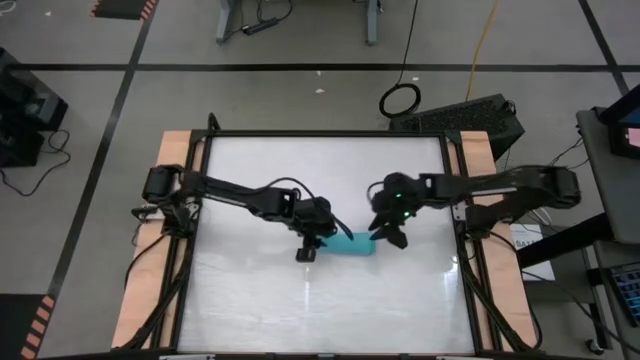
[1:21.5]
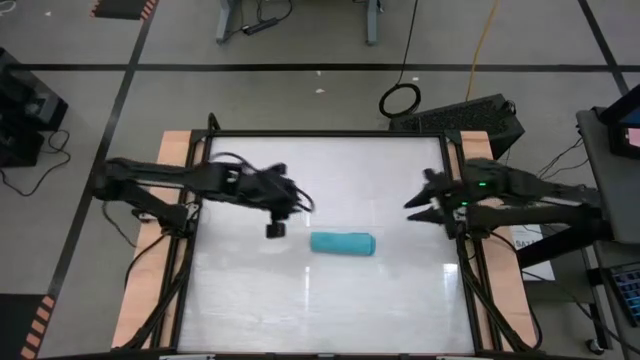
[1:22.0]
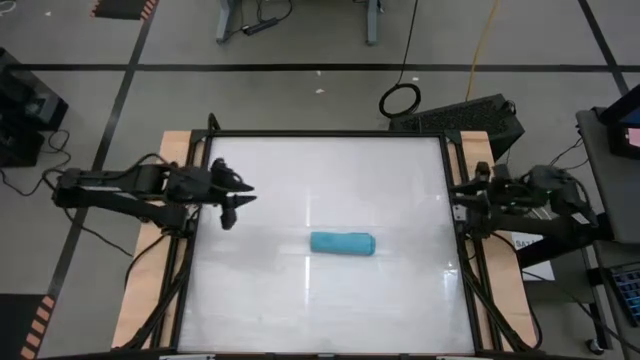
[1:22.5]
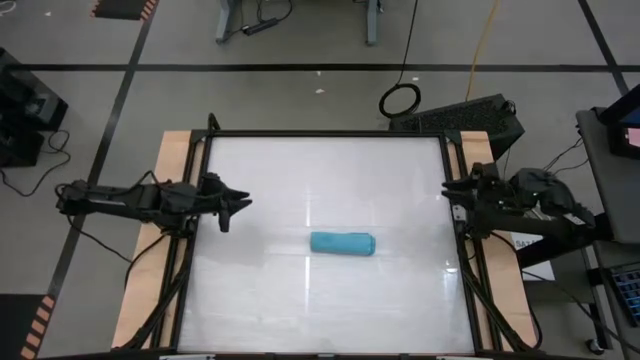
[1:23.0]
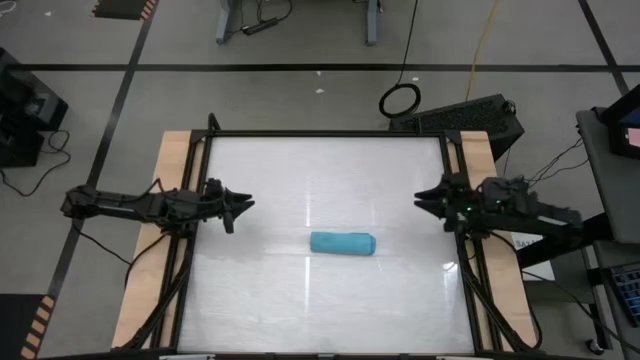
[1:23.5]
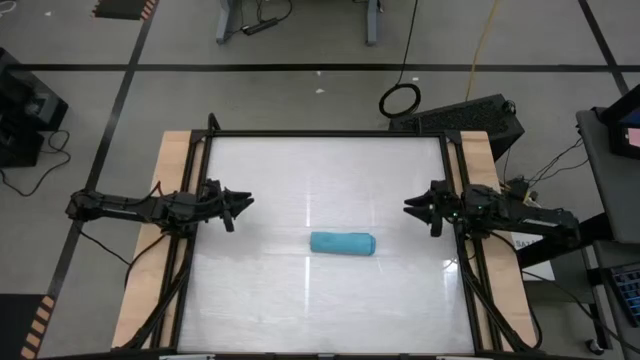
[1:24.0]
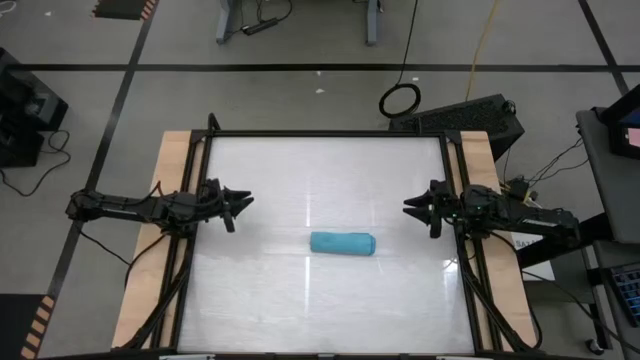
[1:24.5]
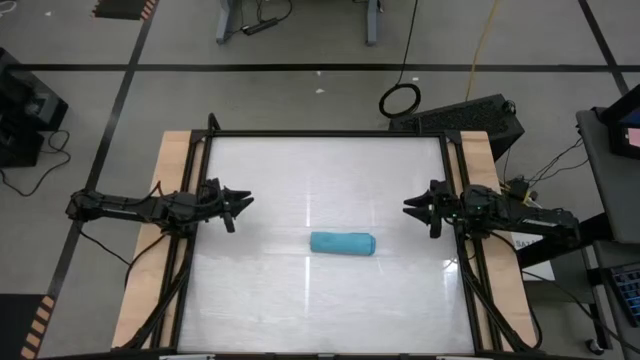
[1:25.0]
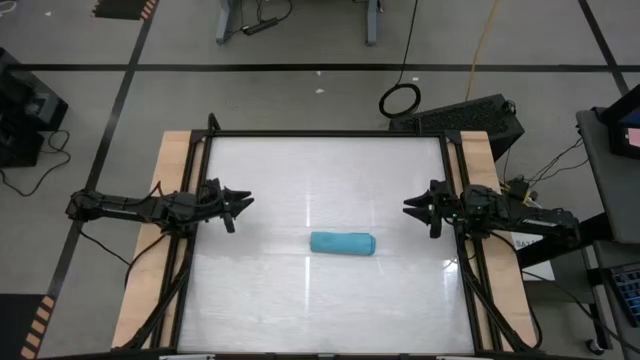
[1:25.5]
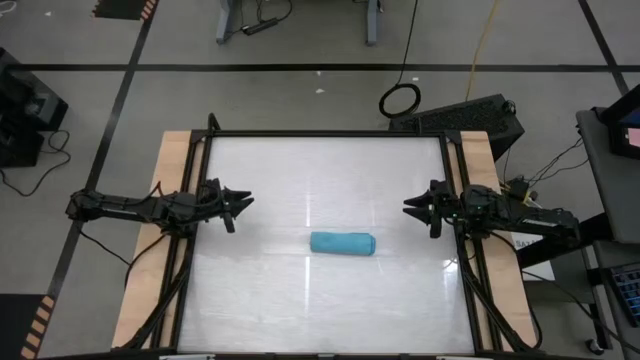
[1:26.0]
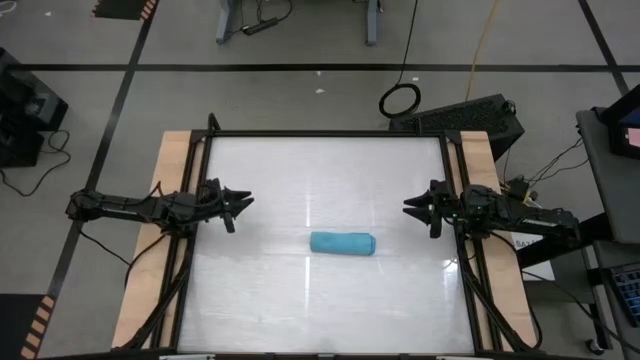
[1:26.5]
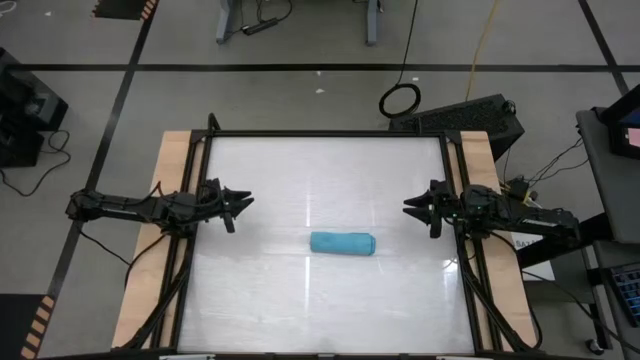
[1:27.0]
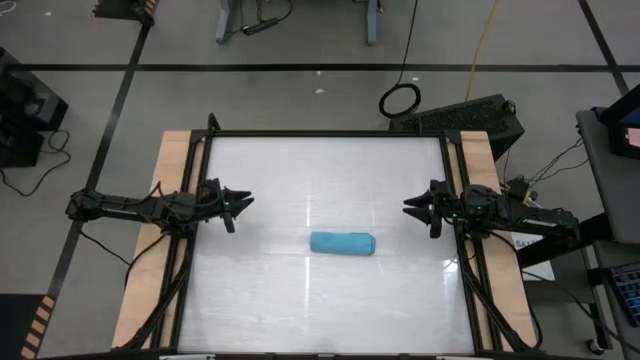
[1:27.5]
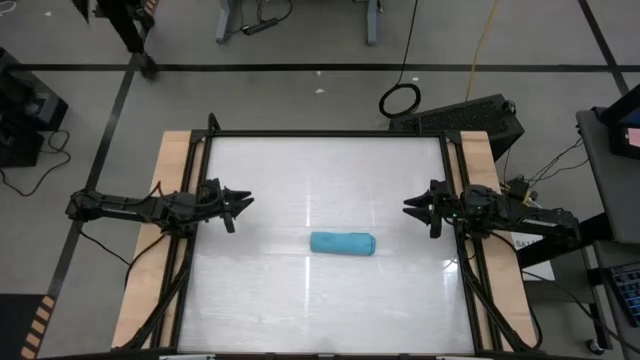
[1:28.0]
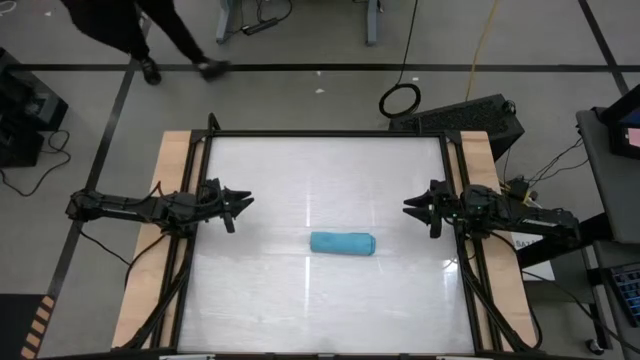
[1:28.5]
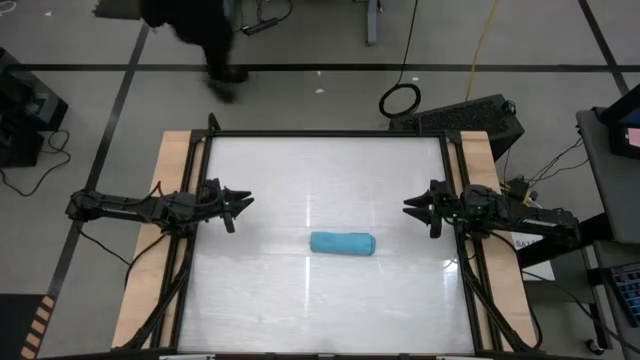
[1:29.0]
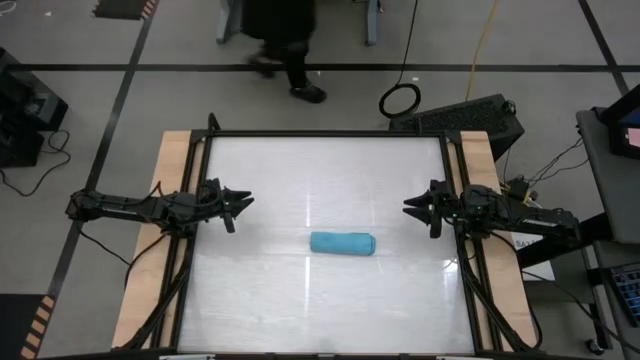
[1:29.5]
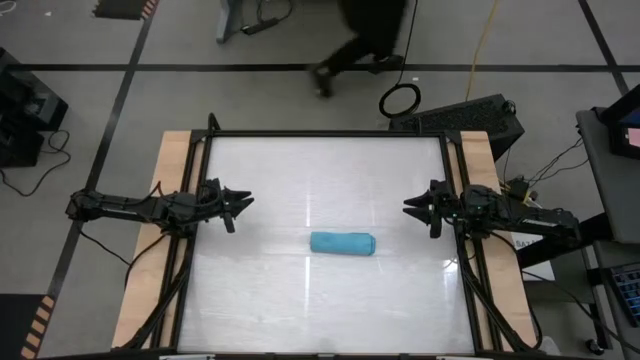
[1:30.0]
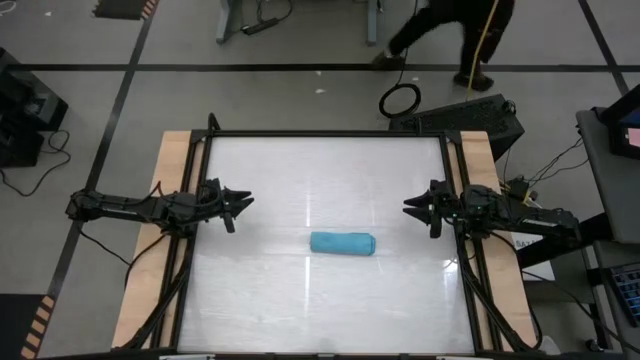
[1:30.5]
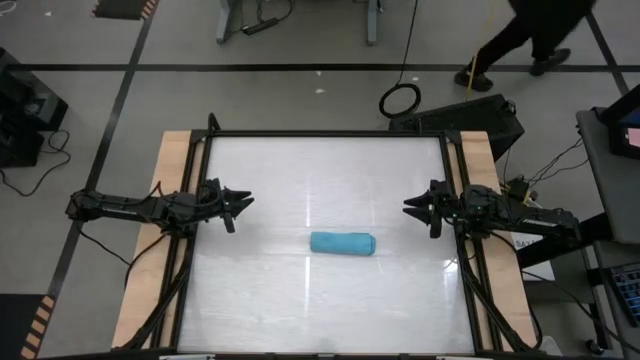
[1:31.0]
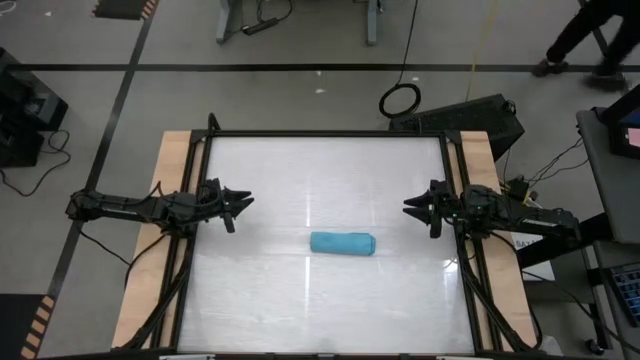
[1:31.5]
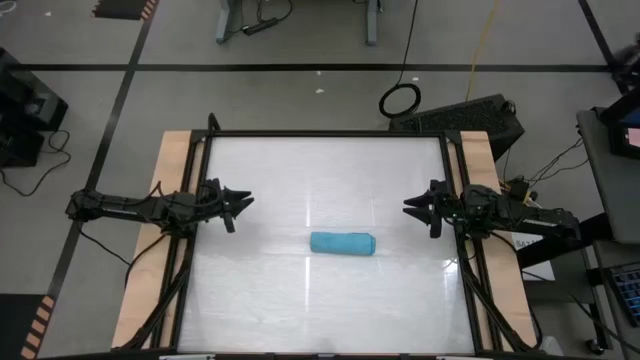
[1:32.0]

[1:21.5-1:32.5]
Task: Roll towel
Return to Home Position

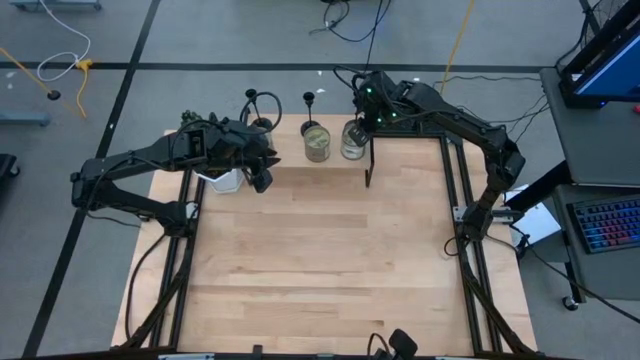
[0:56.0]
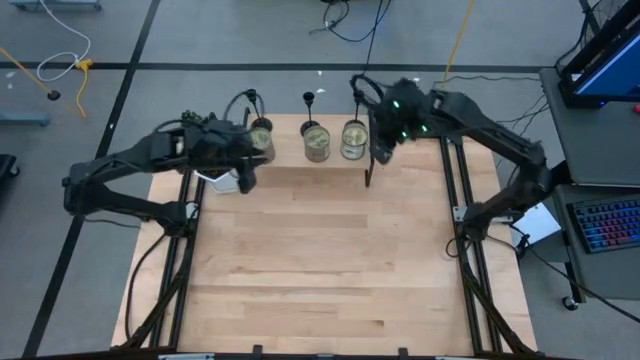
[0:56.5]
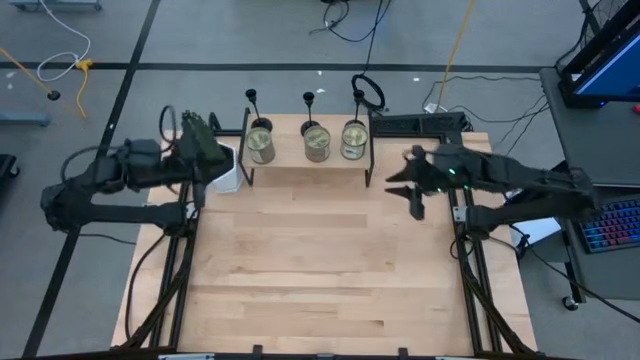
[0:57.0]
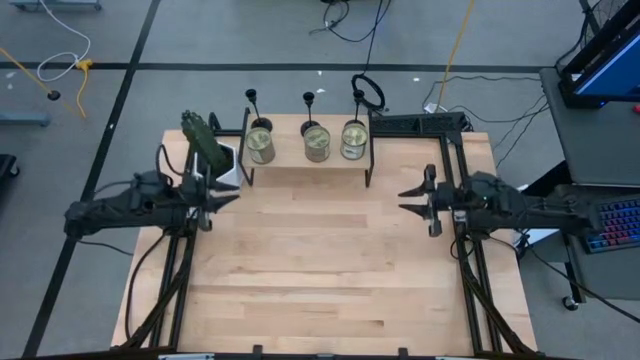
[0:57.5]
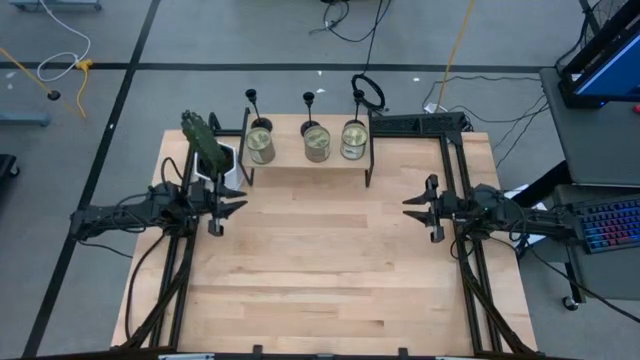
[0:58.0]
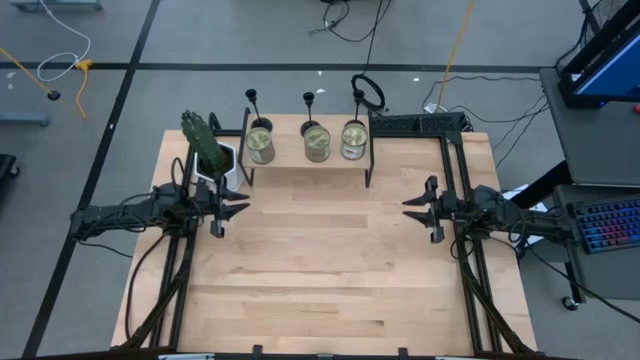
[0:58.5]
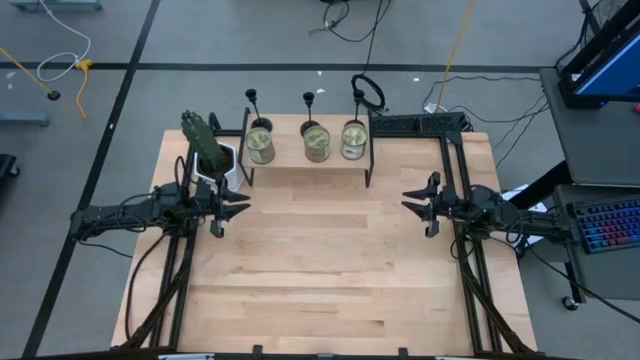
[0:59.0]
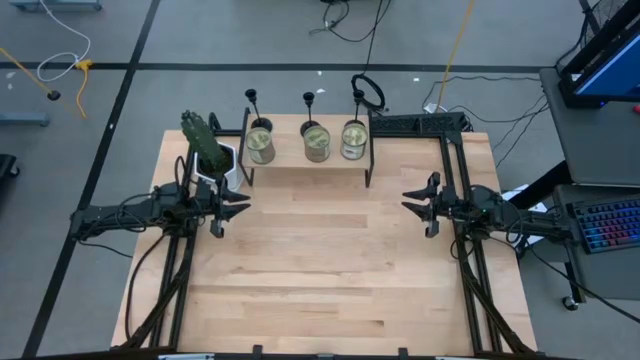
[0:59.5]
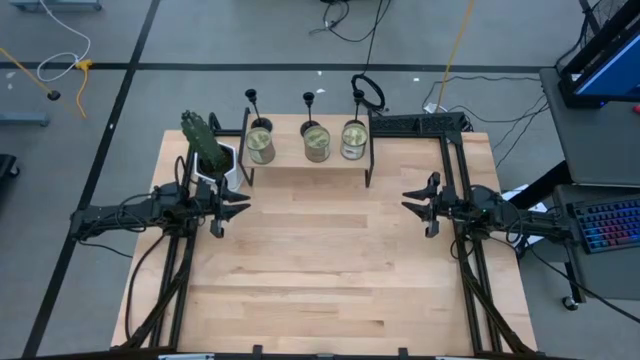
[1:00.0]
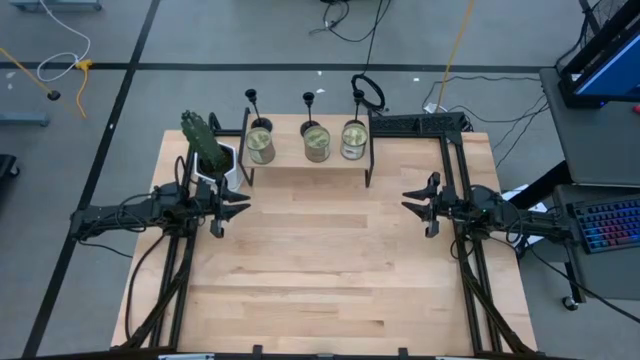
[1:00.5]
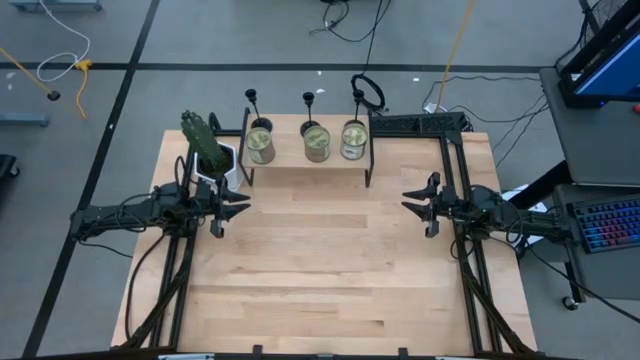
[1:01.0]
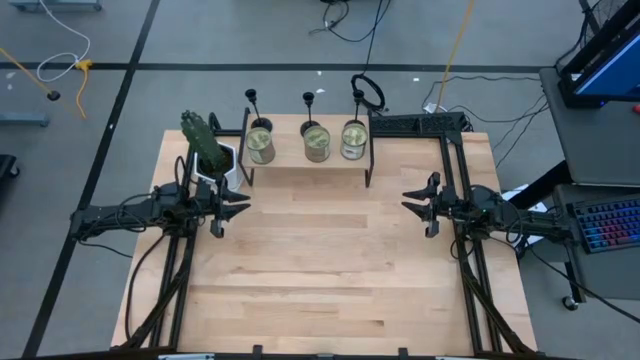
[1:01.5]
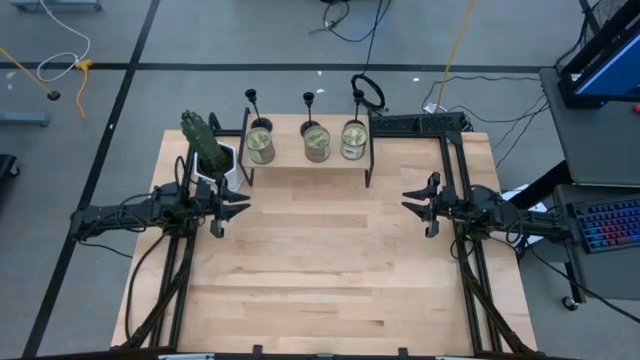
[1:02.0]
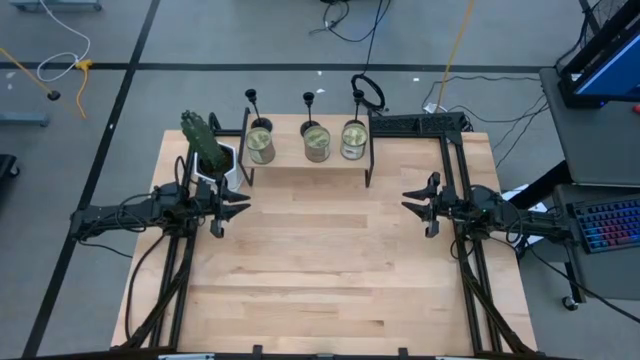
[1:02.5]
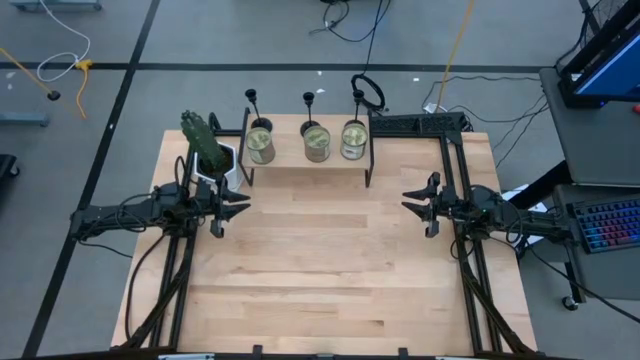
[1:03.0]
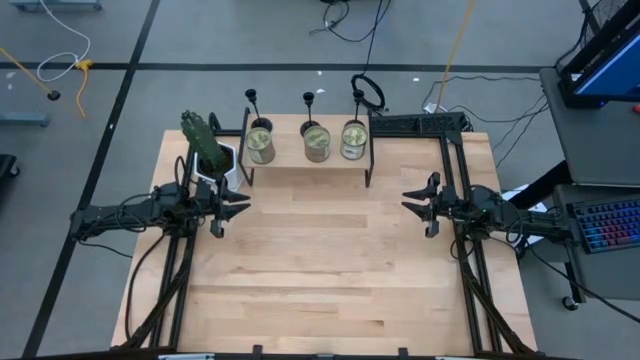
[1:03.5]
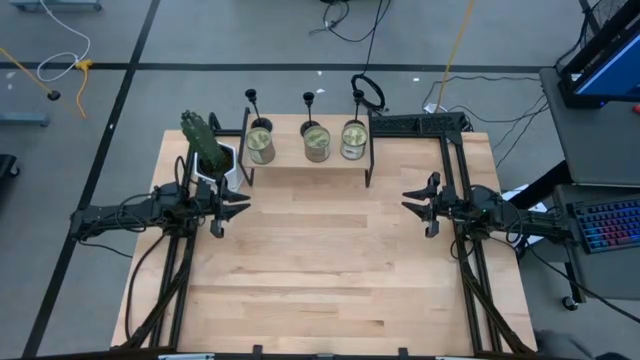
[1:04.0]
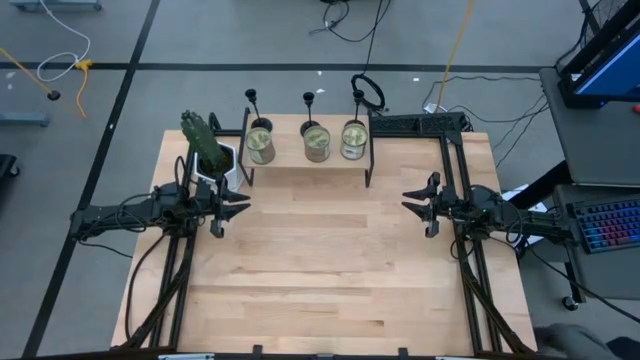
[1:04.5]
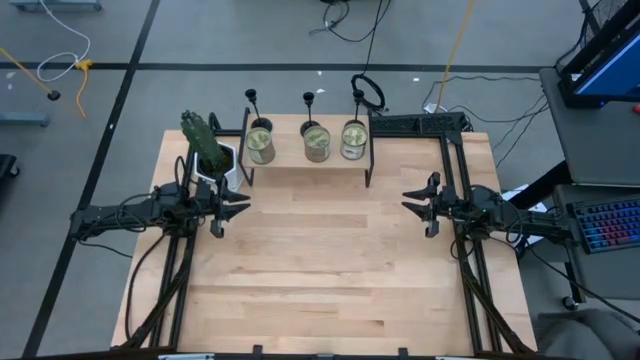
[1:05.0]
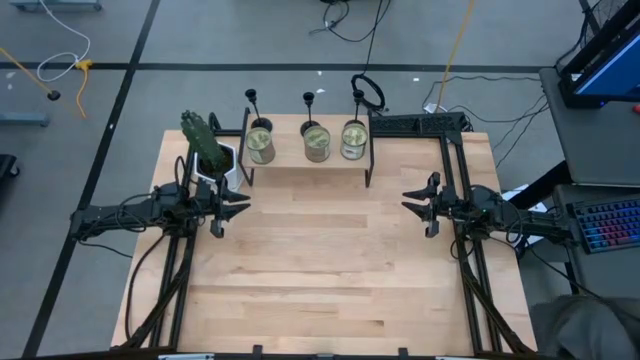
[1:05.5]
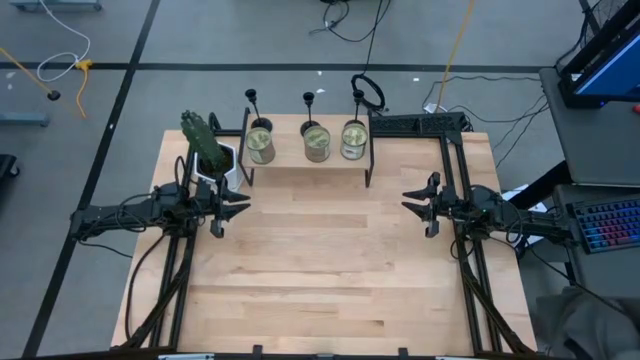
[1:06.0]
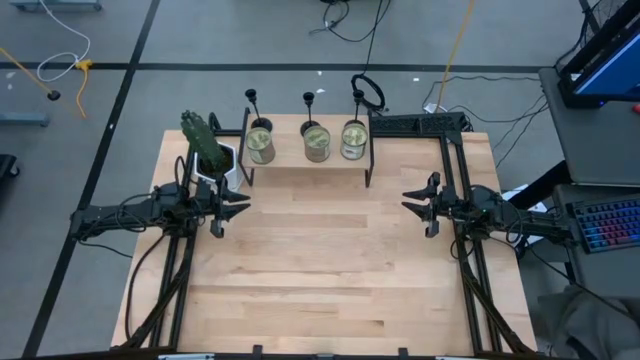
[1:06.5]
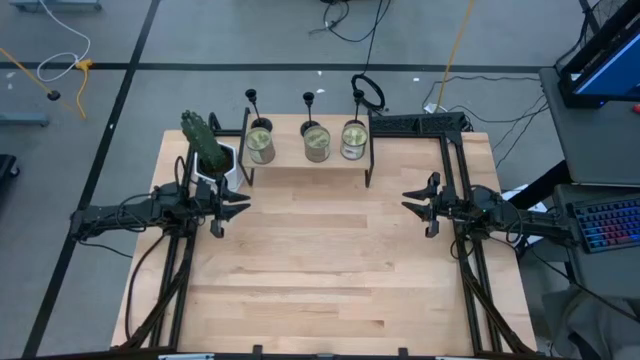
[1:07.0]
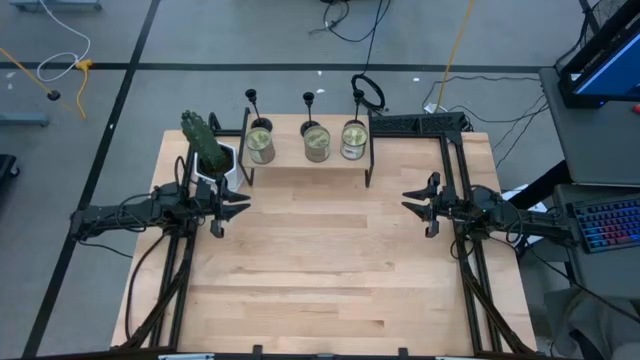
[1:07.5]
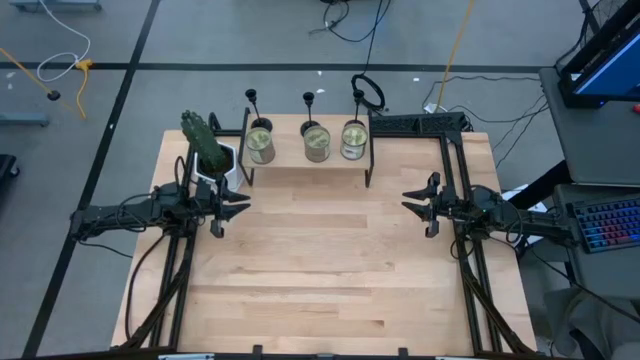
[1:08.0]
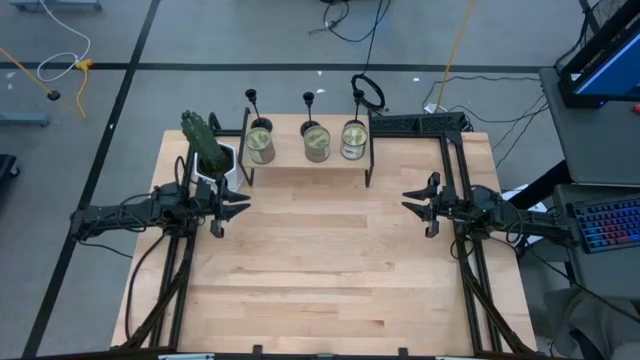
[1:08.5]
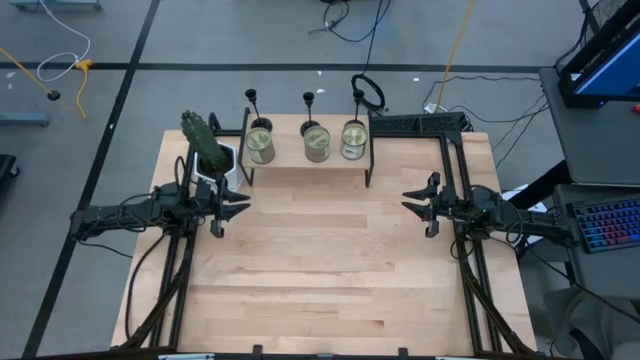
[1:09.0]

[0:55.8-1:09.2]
Task: Pick & Place candle stick holders
Return to Home Position
